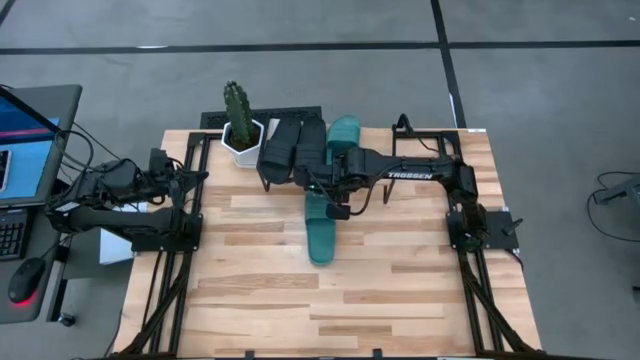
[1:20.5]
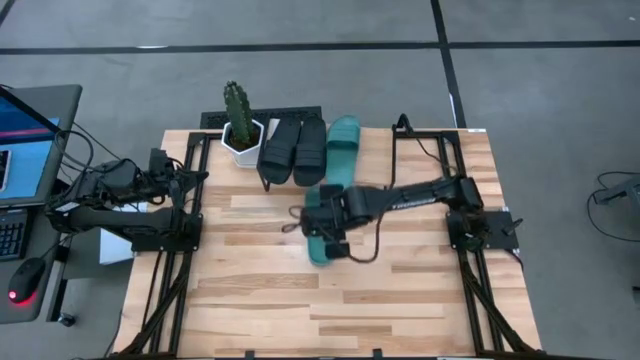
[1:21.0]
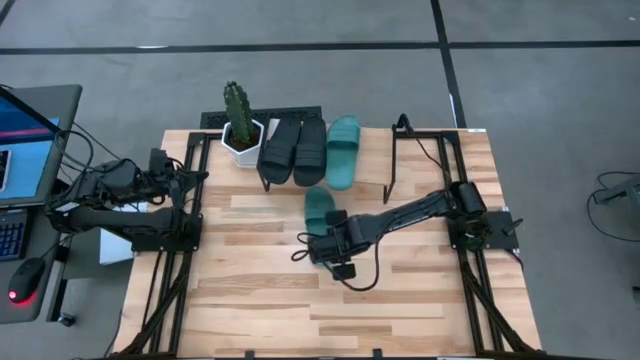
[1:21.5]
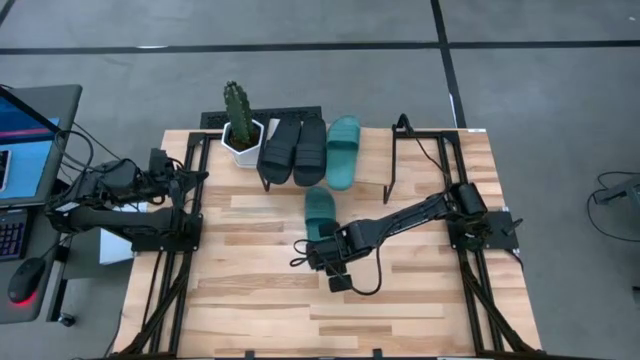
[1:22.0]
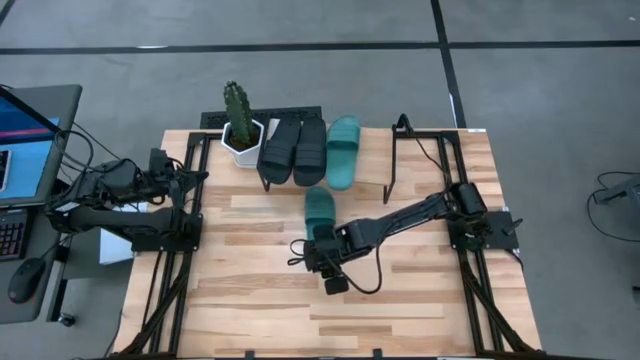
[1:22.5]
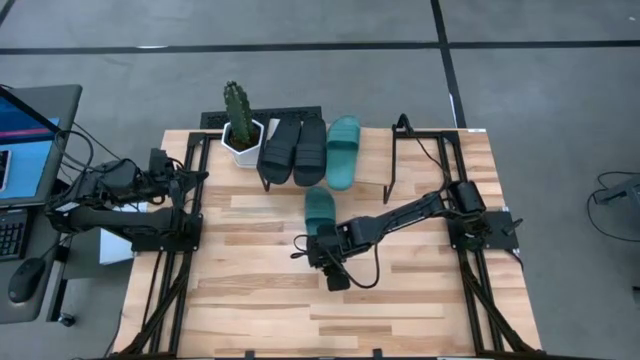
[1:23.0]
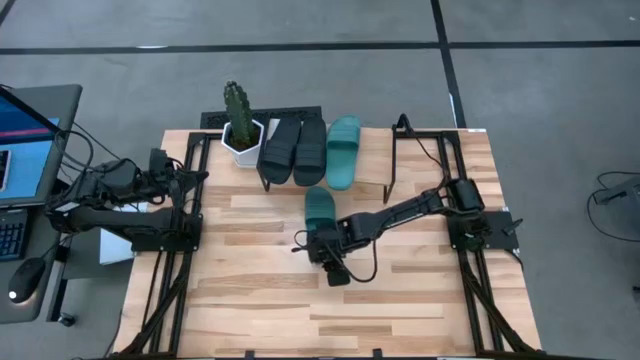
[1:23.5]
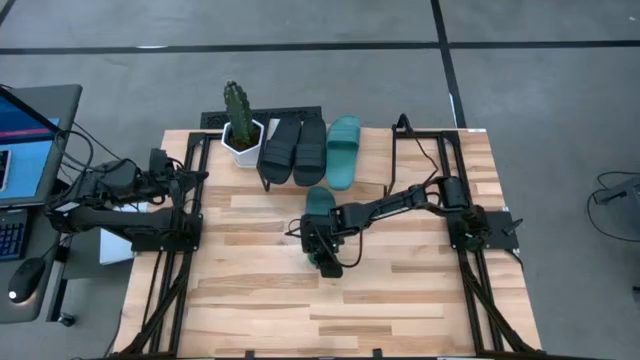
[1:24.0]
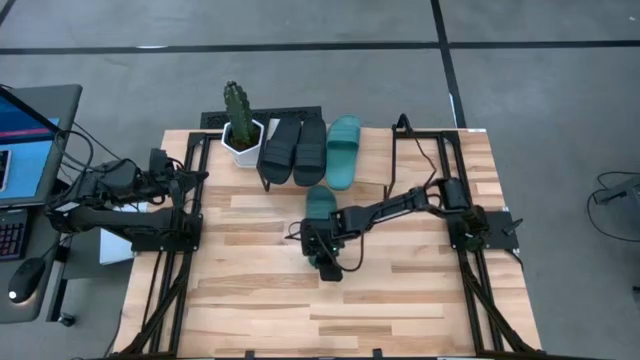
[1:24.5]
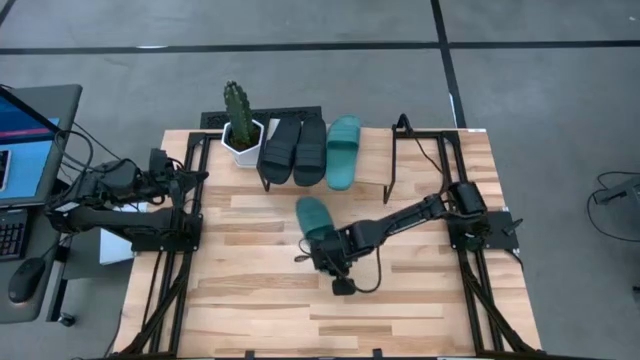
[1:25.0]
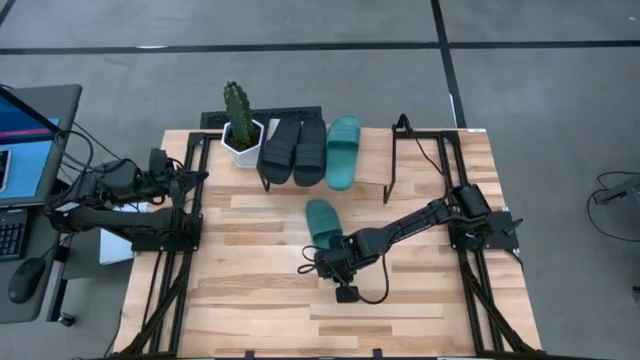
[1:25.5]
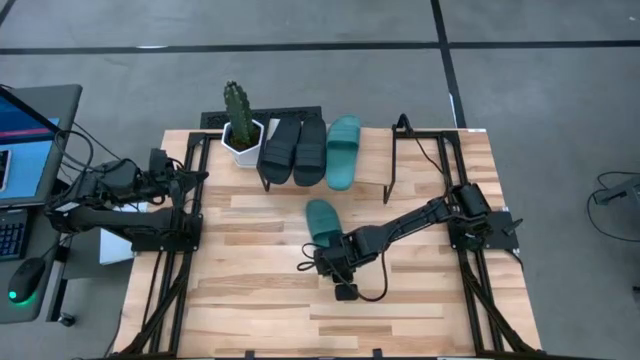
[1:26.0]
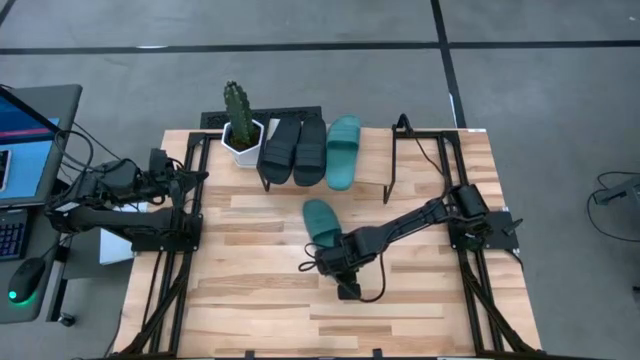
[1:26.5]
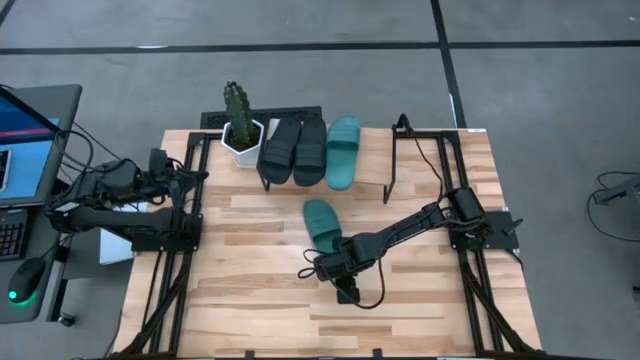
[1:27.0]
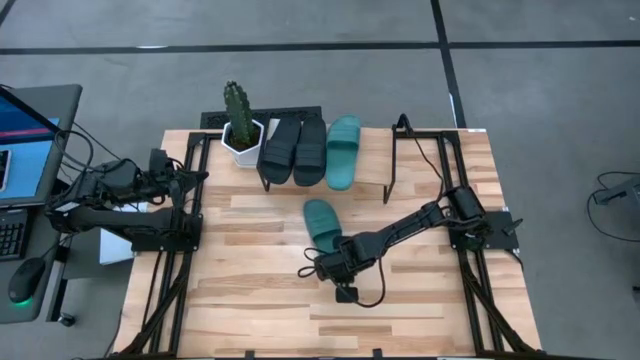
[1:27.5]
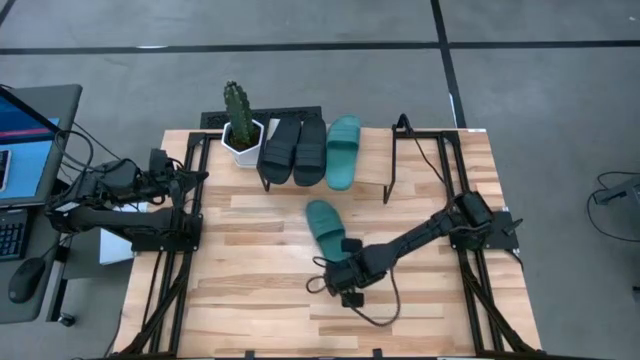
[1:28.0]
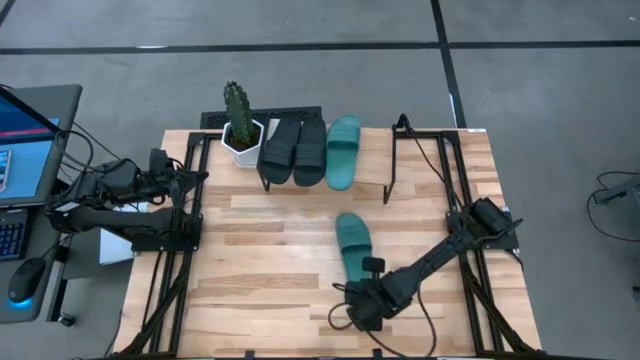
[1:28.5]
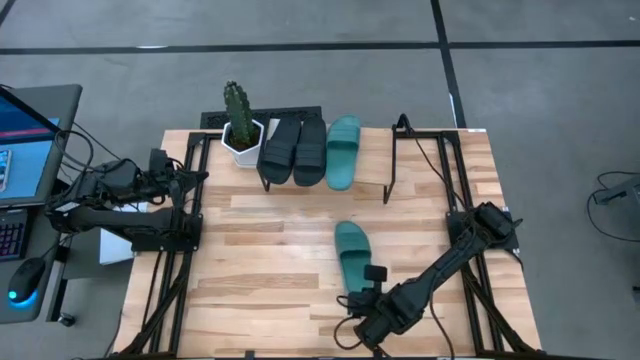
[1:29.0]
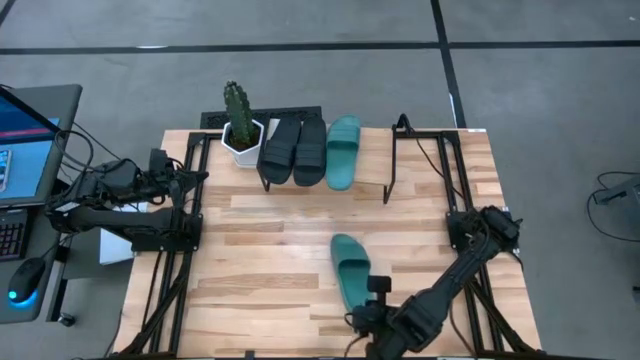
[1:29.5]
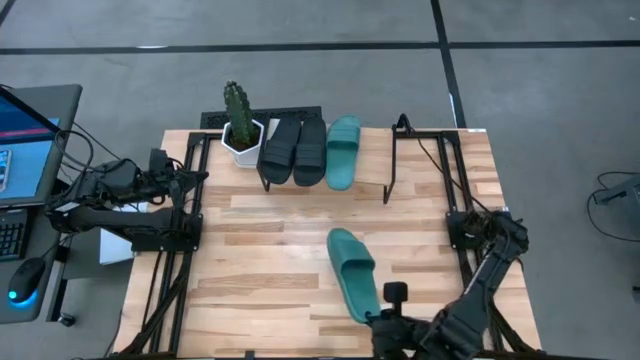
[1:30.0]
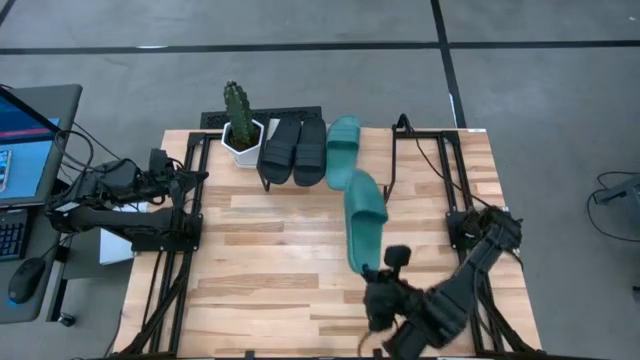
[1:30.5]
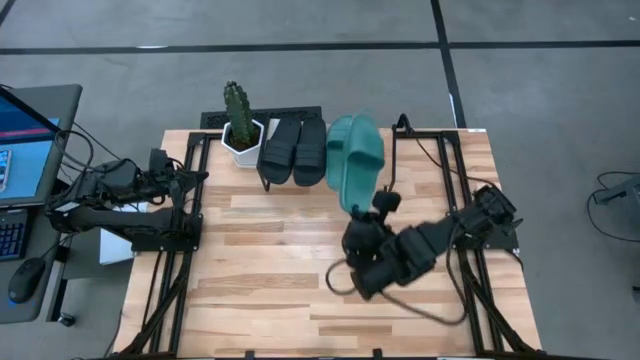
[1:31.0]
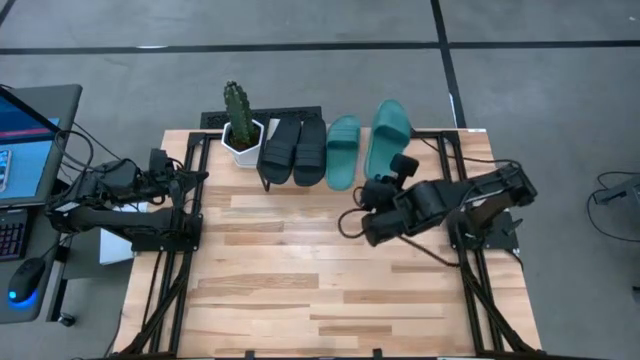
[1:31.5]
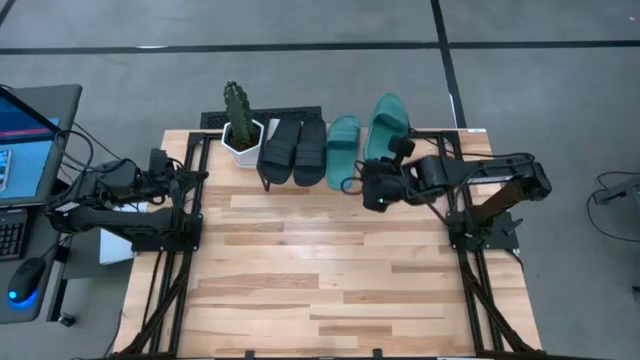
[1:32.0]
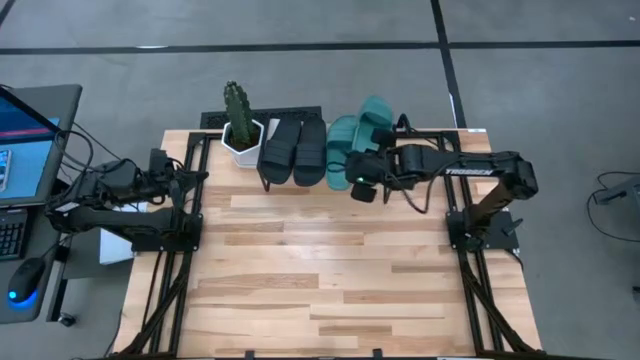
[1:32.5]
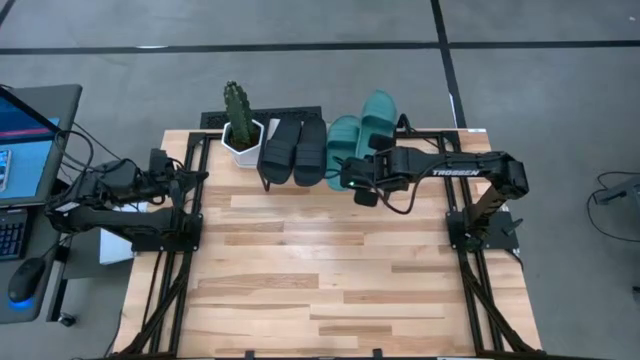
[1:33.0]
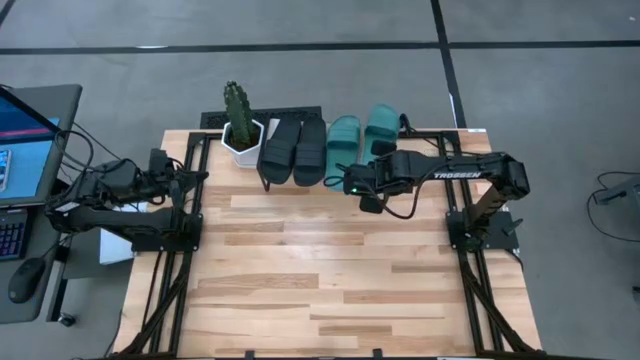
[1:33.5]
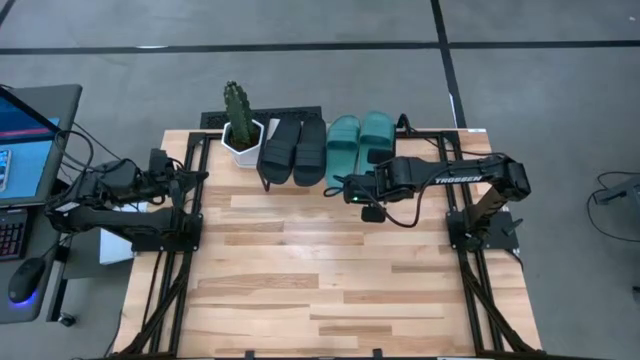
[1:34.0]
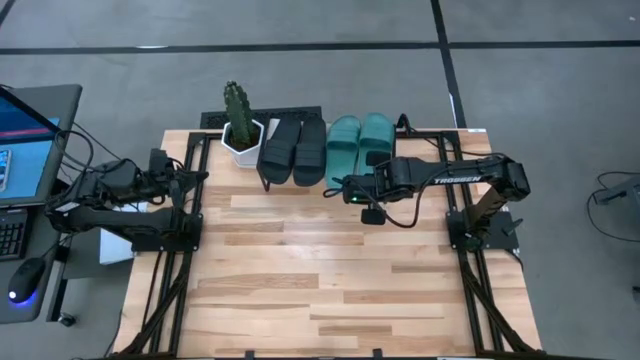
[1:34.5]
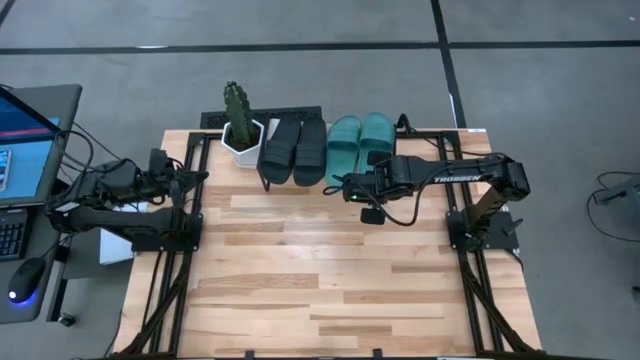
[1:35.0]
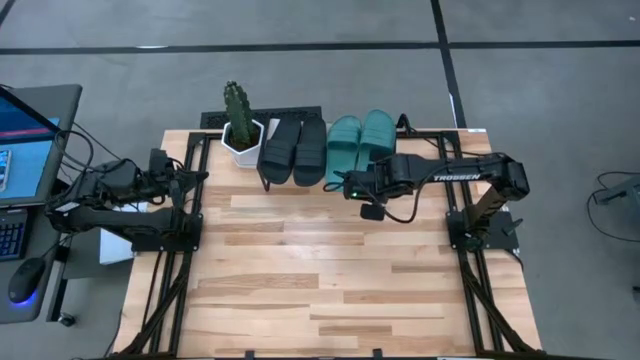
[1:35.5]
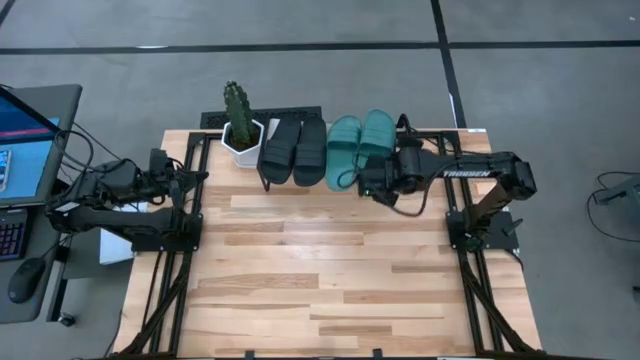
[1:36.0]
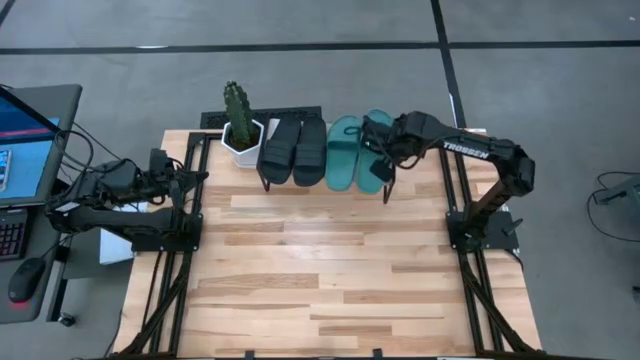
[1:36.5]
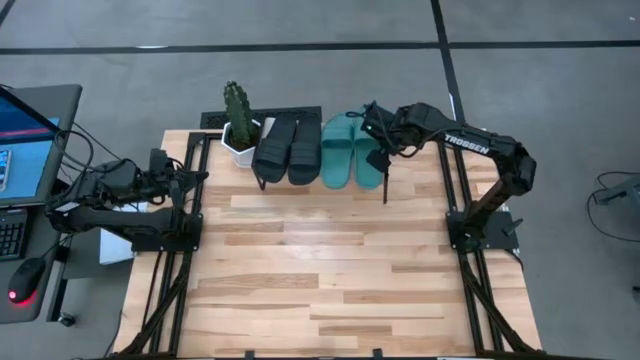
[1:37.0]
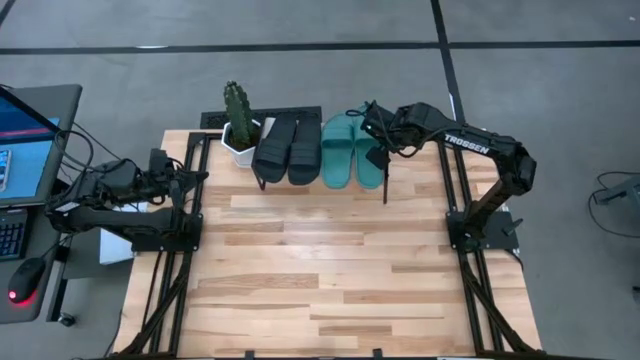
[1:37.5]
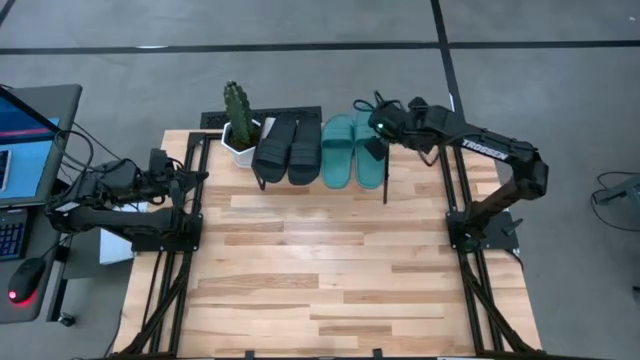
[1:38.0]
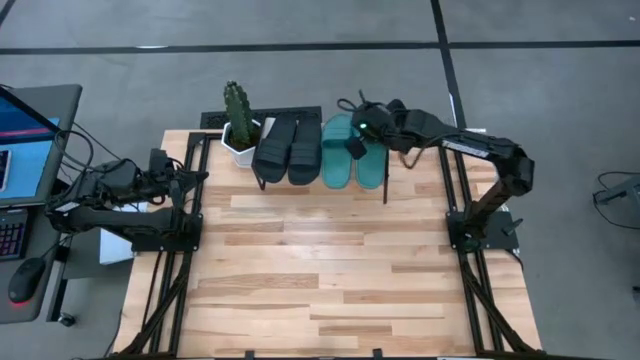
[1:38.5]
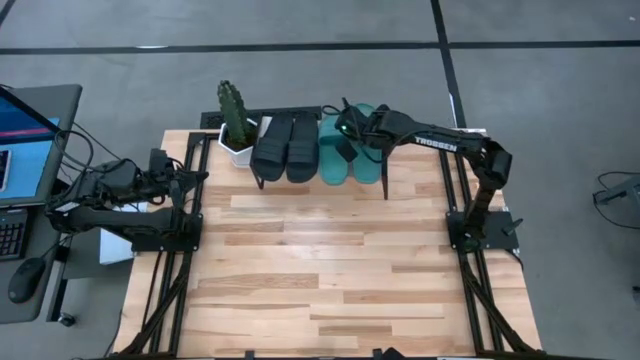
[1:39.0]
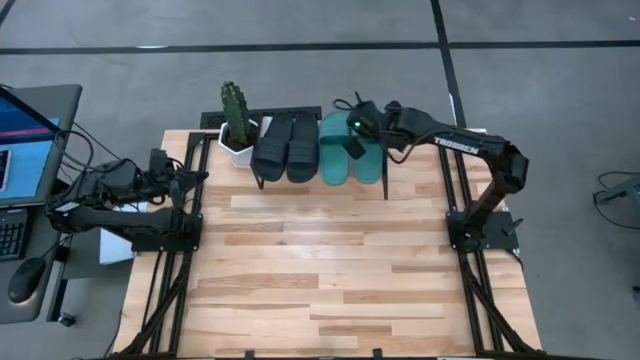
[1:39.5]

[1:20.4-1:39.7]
Task: Pick and place slides into the shelf
Put the blue slides on the shelf
